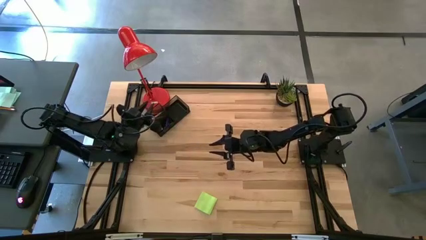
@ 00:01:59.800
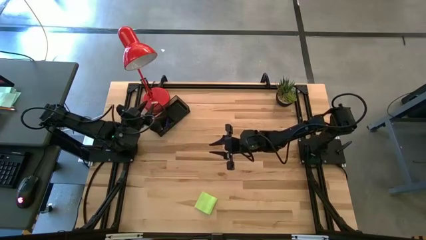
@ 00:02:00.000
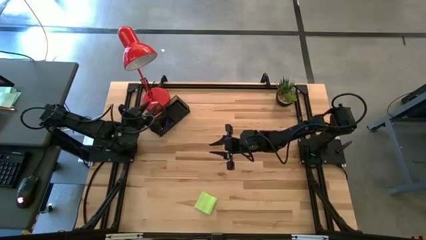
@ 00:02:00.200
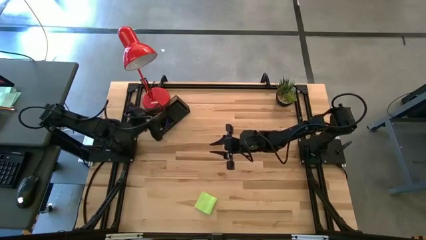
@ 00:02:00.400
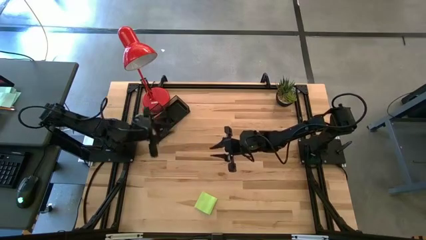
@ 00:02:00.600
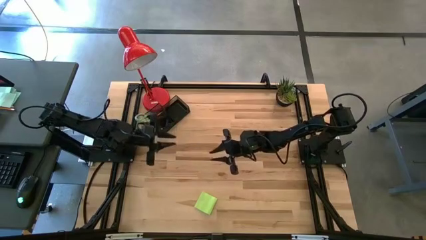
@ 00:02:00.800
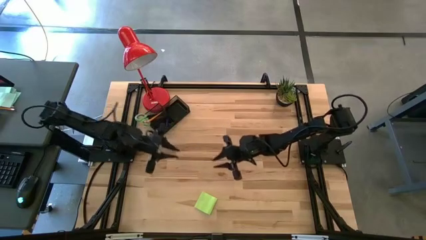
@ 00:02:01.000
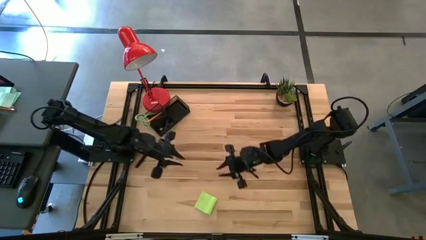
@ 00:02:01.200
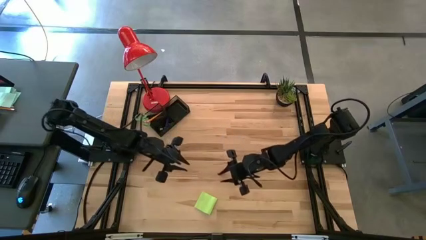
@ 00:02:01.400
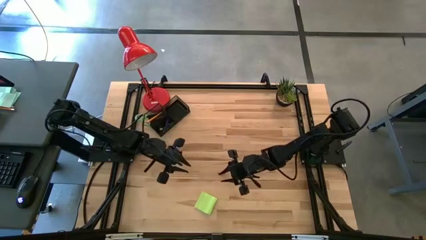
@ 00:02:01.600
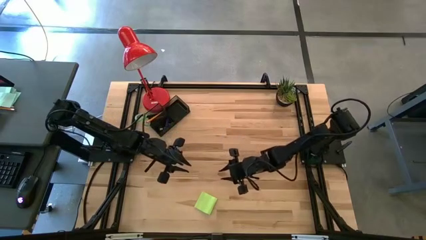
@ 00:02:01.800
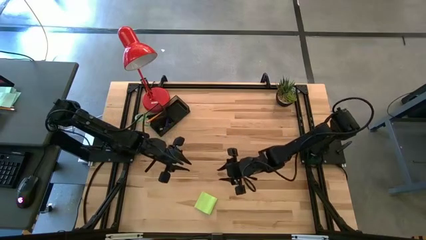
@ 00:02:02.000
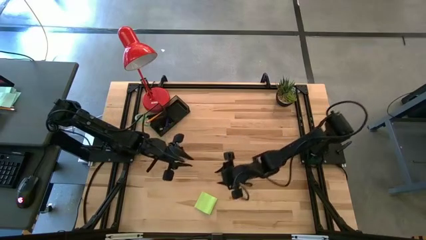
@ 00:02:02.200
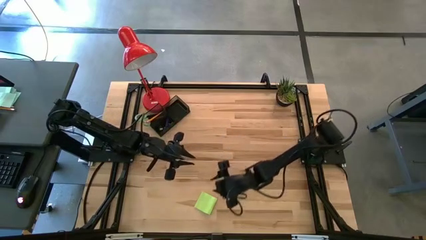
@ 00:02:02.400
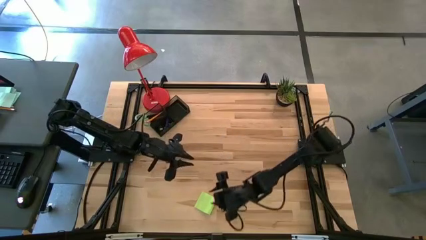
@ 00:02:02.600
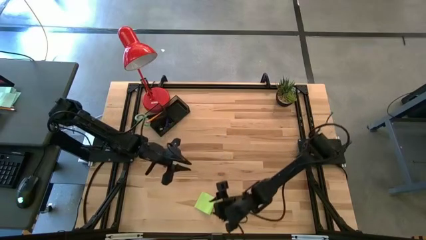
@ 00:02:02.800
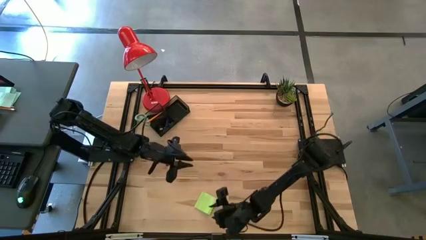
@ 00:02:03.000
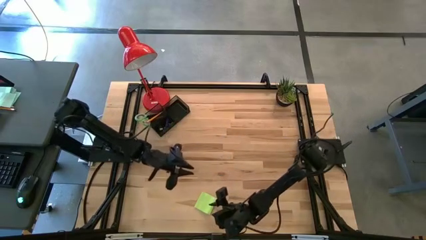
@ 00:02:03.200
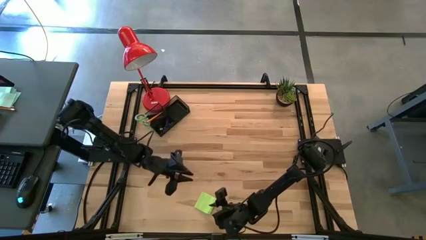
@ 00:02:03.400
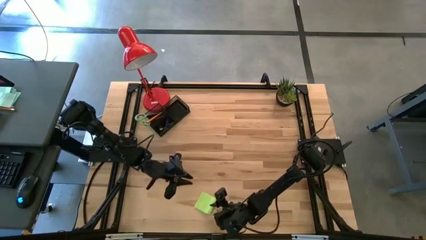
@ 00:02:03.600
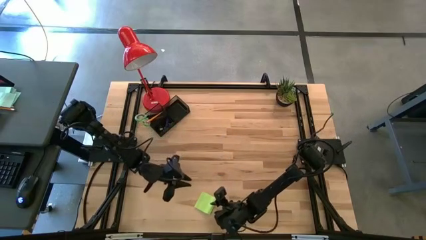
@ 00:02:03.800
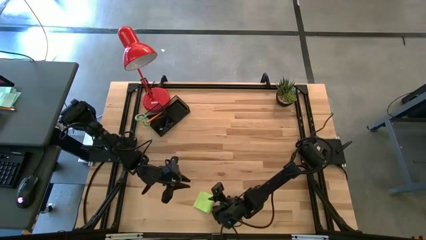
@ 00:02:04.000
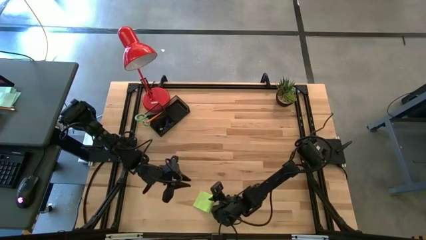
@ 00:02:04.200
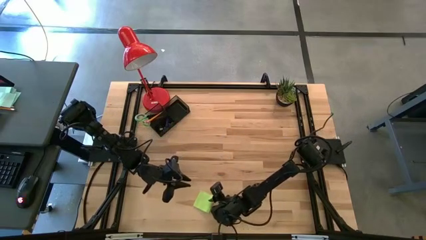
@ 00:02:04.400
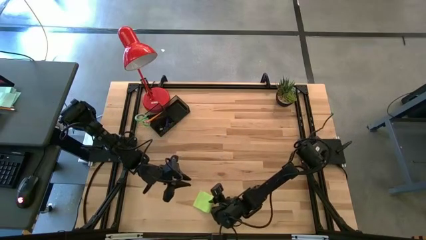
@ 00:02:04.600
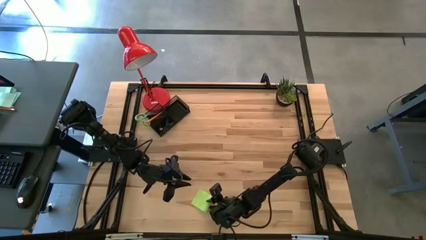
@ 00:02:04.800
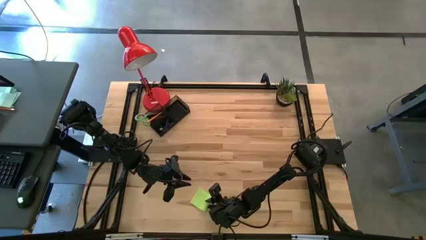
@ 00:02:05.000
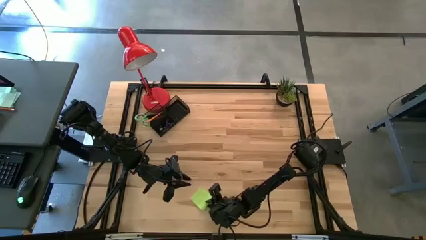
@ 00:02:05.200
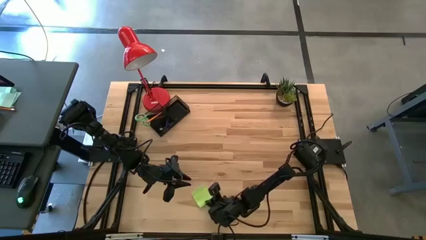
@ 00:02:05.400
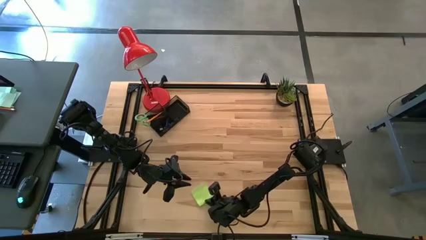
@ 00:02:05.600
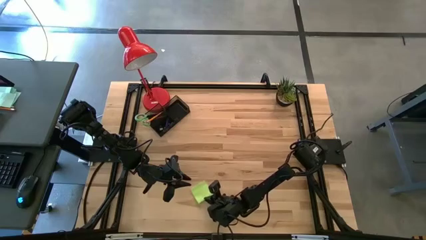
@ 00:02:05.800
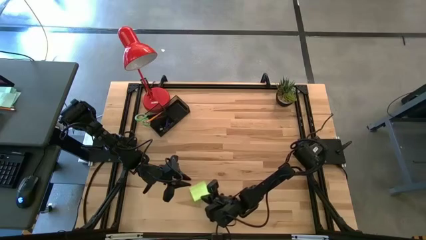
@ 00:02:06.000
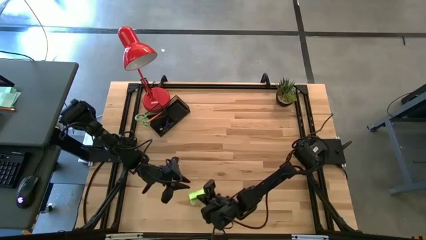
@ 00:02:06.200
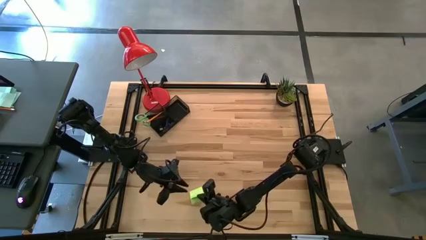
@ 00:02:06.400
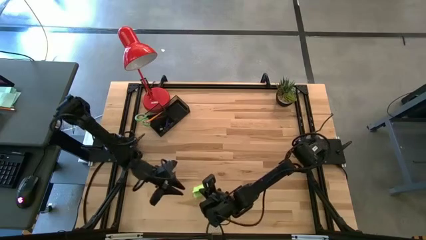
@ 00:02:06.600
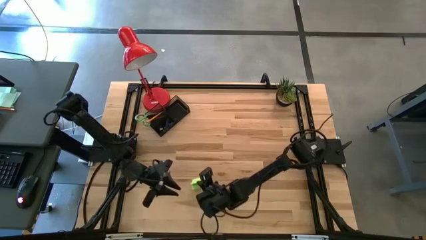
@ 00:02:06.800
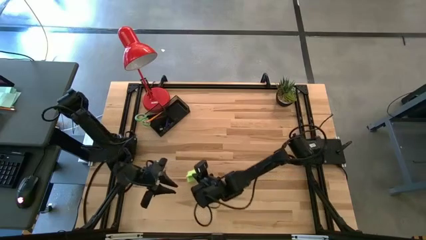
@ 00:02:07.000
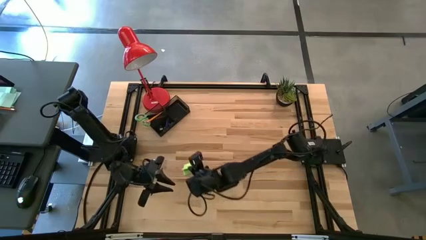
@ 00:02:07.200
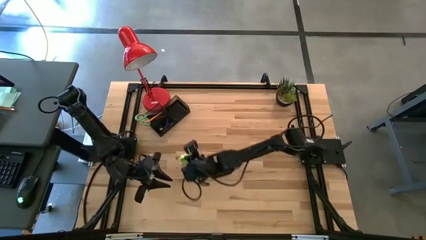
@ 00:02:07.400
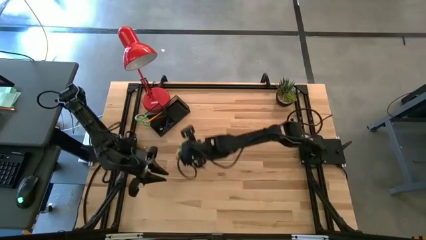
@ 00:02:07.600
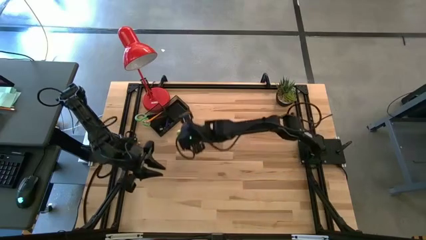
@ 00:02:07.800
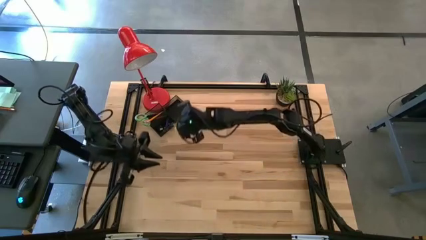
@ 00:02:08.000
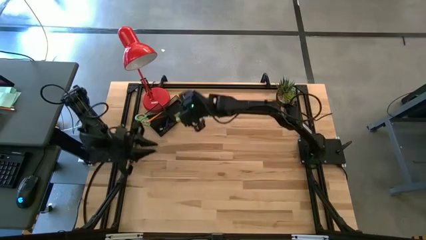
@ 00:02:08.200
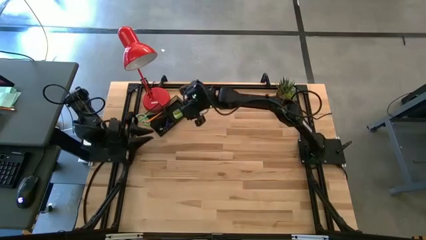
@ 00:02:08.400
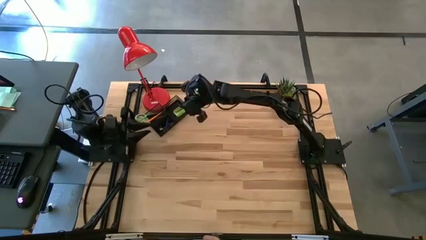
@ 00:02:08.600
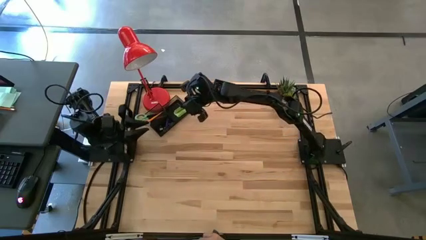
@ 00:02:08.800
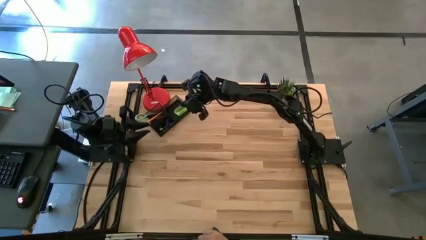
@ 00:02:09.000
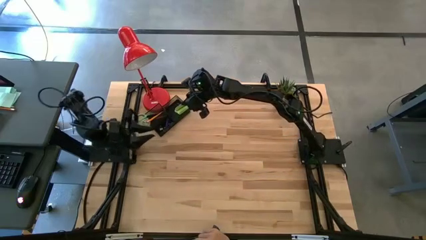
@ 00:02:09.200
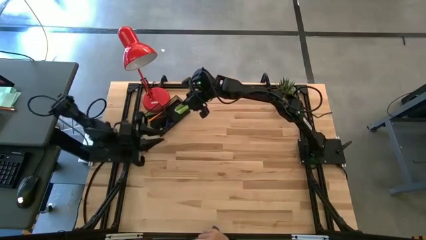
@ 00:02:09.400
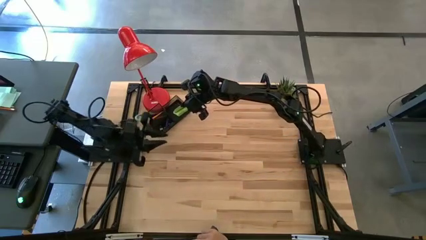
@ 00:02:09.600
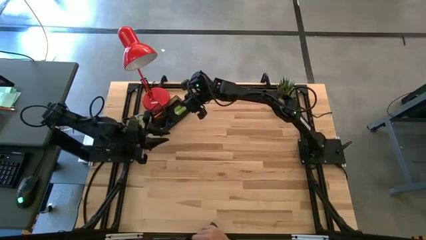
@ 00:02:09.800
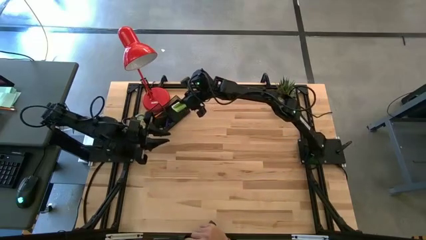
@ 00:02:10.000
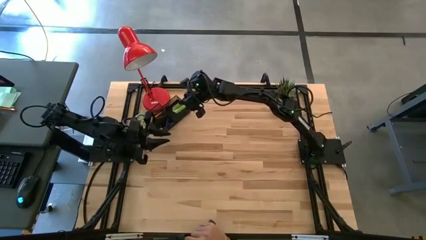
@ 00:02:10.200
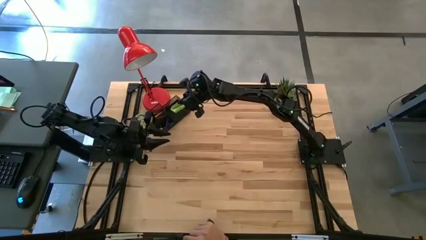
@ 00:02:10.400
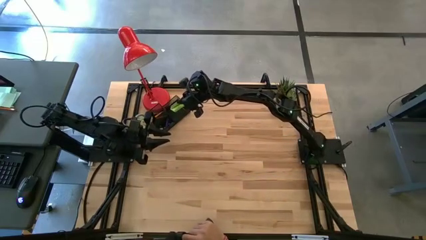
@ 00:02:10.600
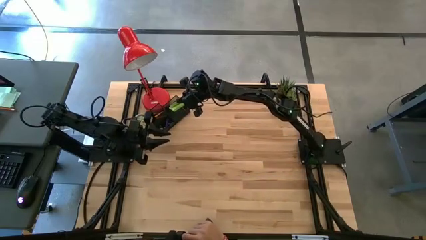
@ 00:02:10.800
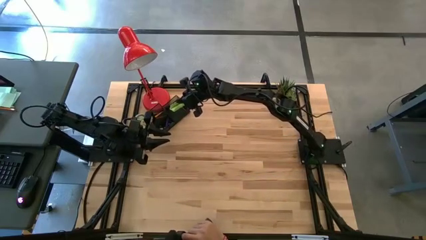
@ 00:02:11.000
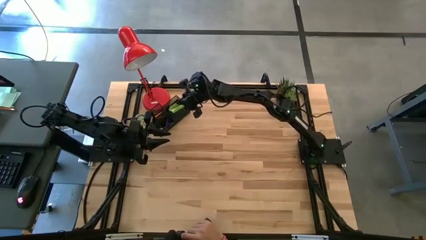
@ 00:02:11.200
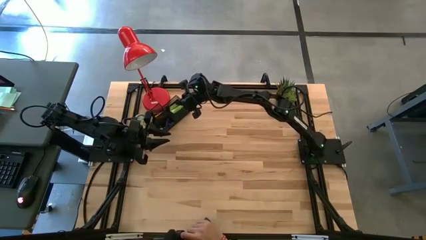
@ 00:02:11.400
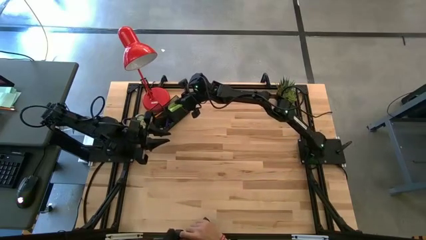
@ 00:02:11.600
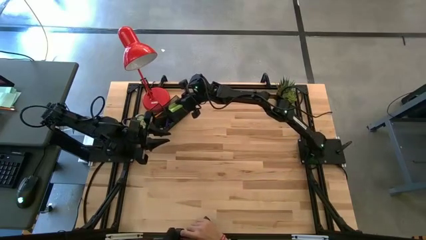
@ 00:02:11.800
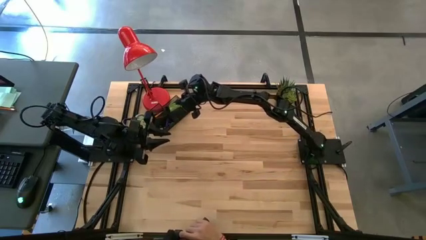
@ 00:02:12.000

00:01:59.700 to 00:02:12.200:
Task: Pick and place office supplies into organizer
Put the green sticky notes into the desk organizer

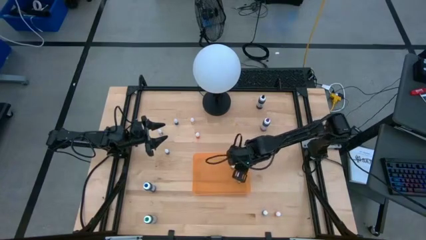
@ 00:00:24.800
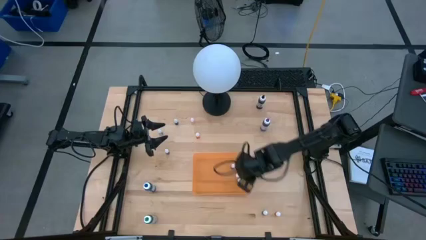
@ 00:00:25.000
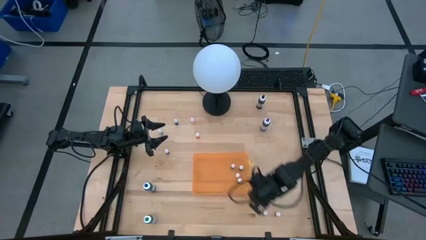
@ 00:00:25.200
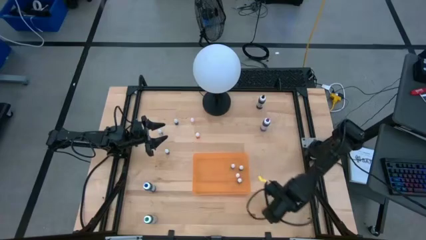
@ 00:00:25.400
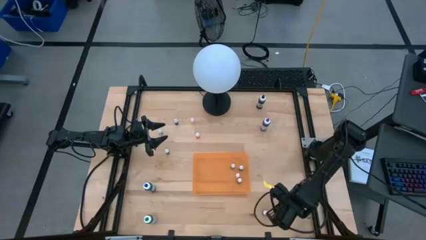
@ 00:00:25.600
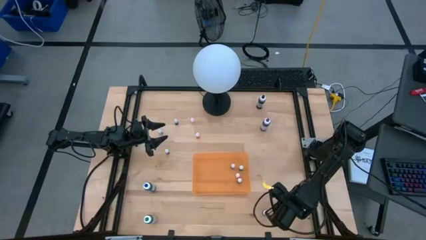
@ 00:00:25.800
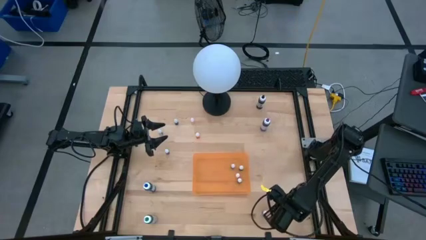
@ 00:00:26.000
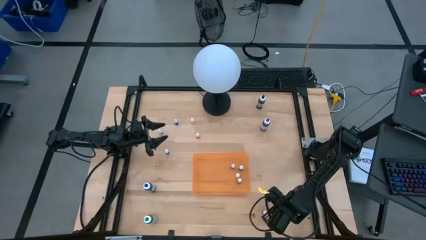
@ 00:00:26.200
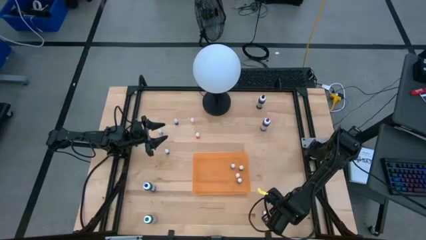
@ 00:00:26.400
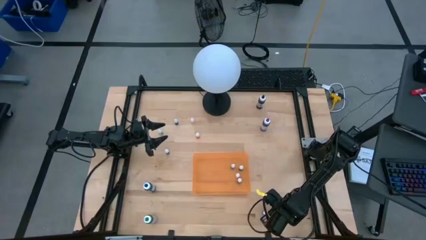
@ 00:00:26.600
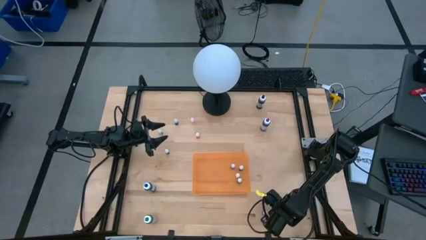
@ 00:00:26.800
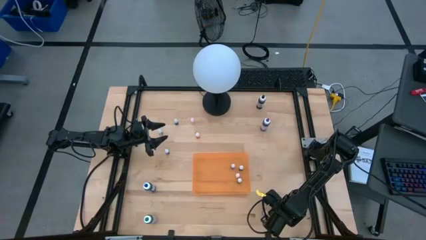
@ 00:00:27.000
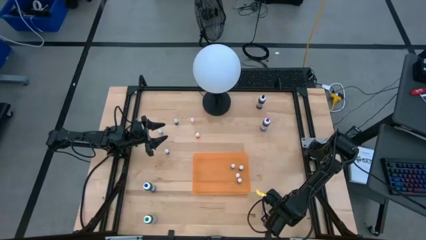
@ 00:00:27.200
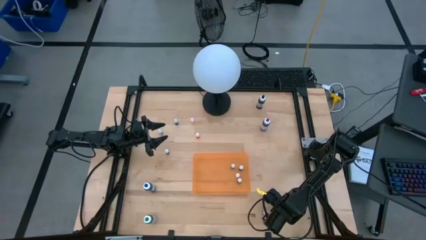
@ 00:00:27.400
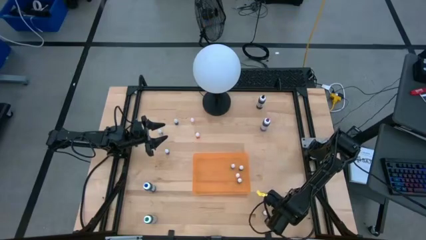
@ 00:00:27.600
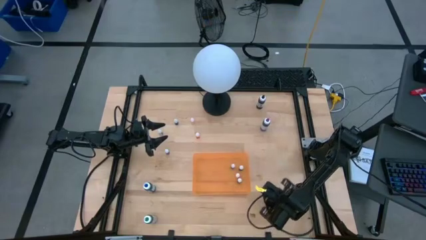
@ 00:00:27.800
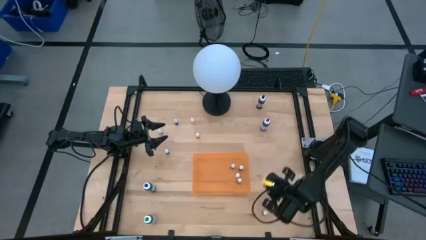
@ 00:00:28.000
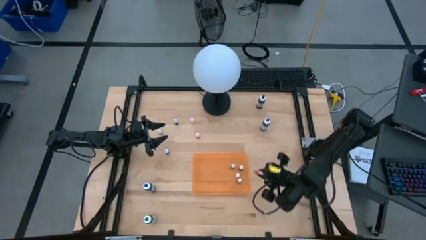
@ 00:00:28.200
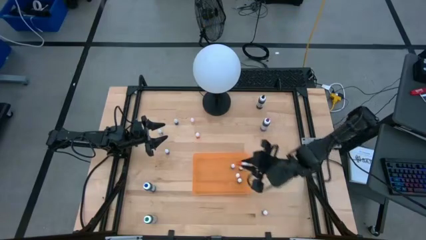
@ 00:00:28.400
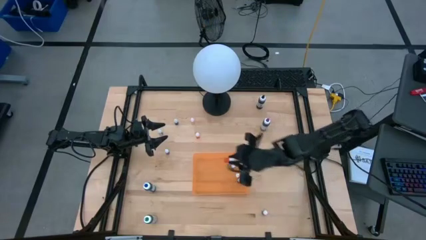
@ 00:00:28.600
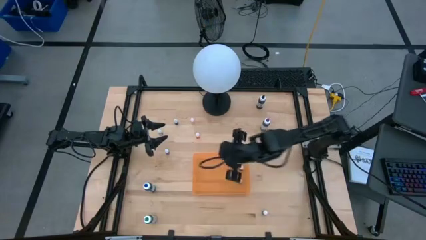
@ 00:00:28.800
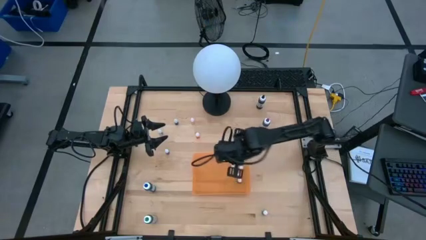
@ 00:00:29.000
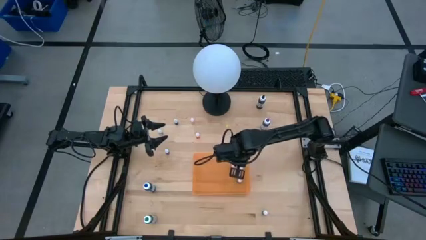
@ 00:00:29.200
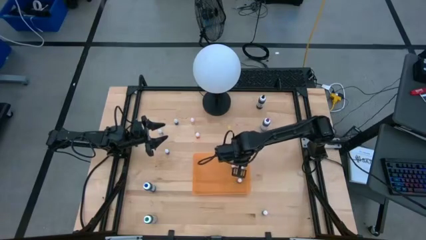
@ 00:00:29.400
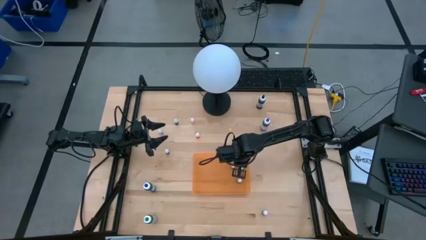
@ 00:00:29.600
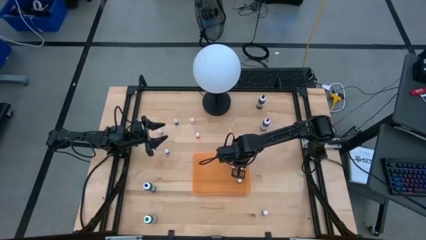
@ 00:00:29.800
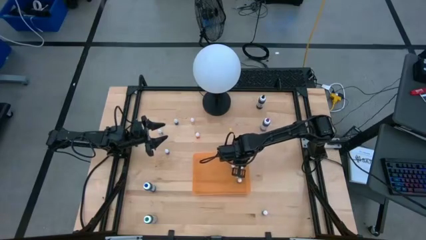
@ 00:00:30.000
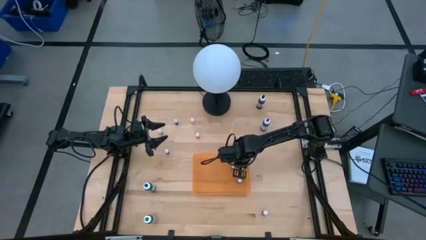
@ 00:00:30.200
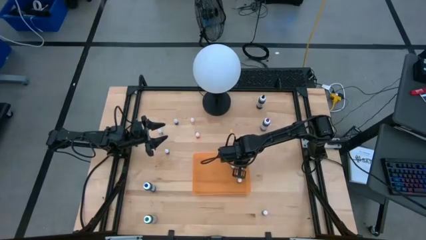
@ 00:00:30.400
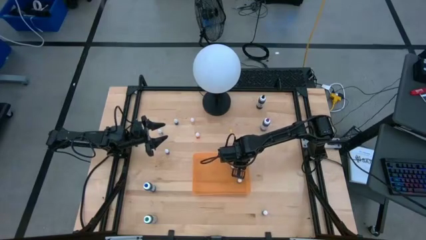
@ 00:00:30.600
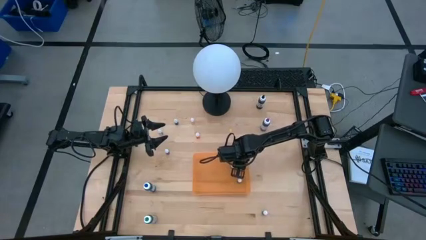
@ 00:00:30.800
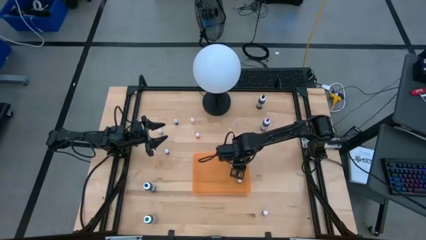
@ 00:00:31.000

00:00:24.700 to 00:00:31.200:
Task: Pick & Place food coloring
Put the small orange food coloring bottle into the orange container
